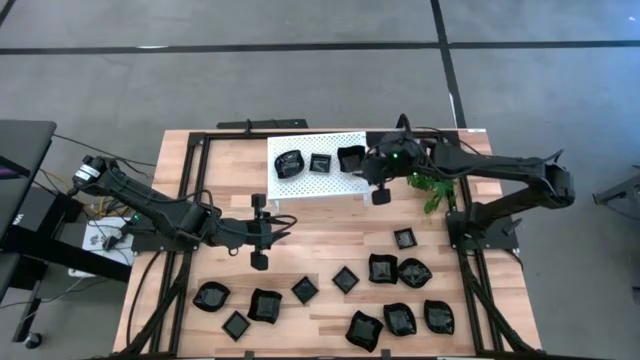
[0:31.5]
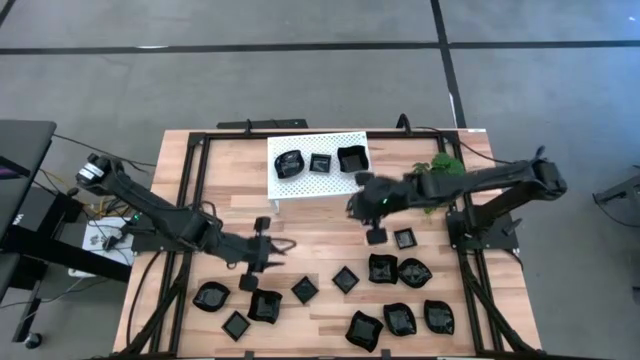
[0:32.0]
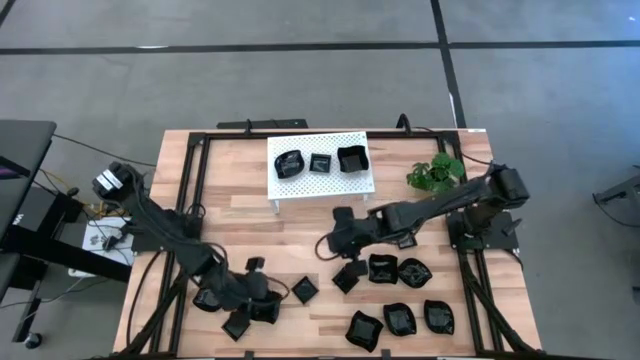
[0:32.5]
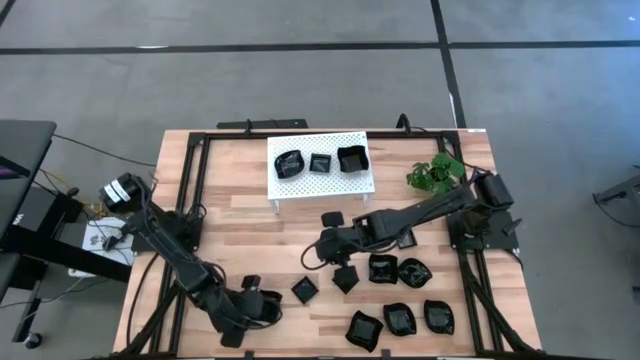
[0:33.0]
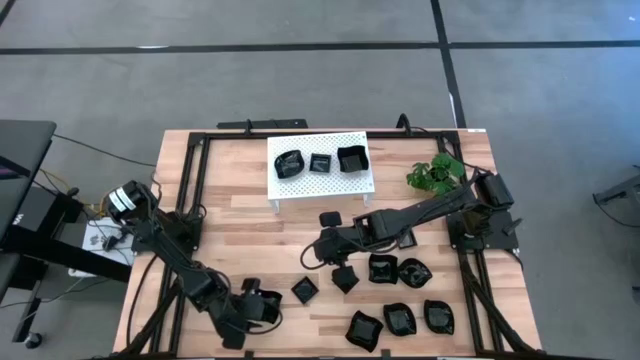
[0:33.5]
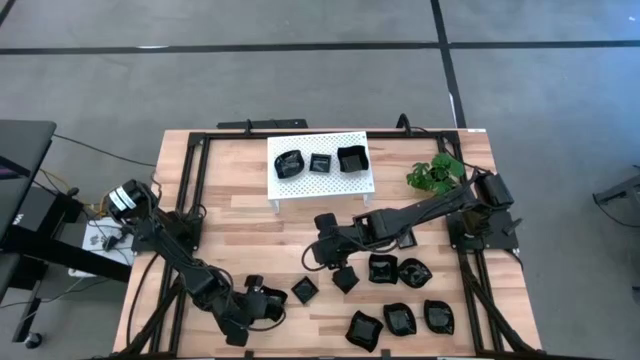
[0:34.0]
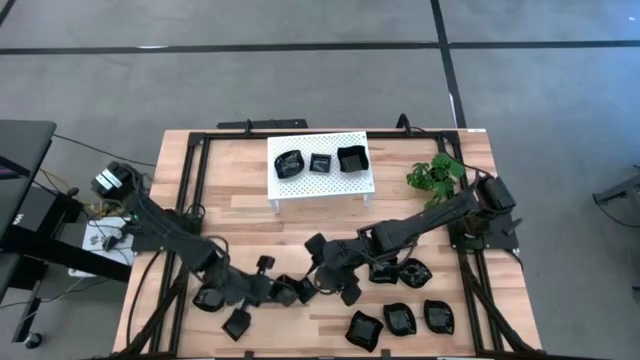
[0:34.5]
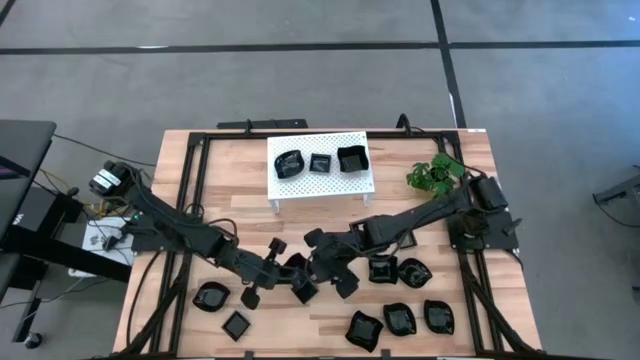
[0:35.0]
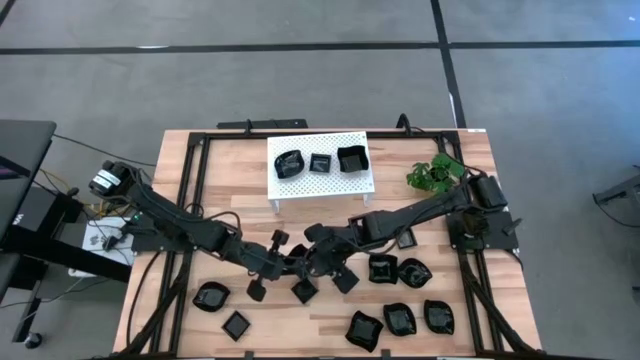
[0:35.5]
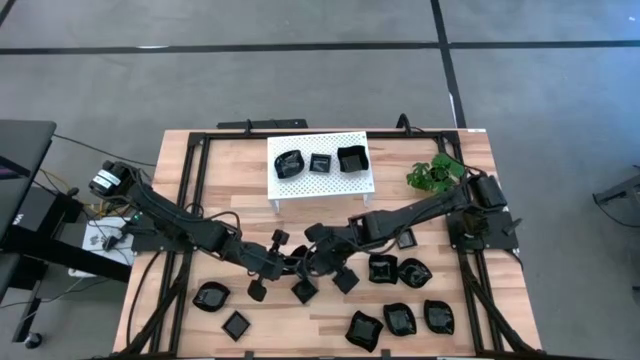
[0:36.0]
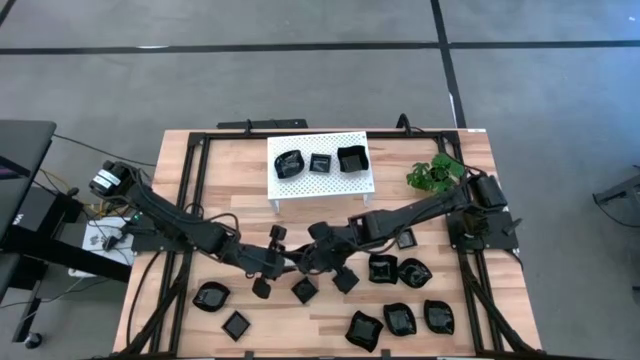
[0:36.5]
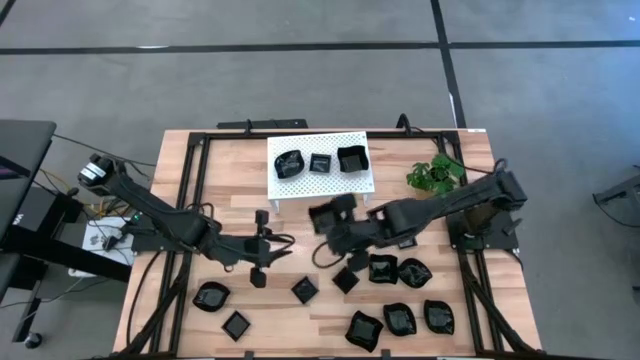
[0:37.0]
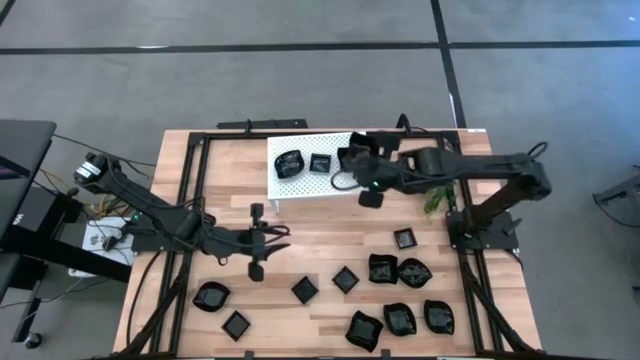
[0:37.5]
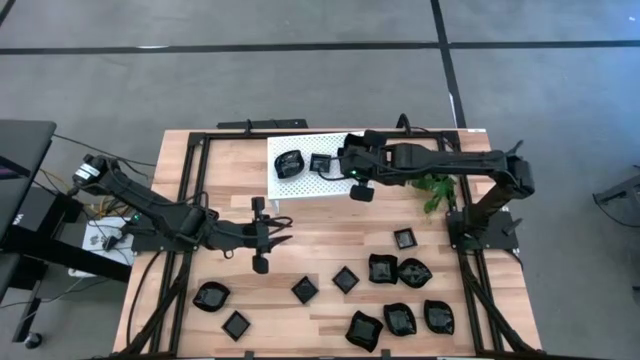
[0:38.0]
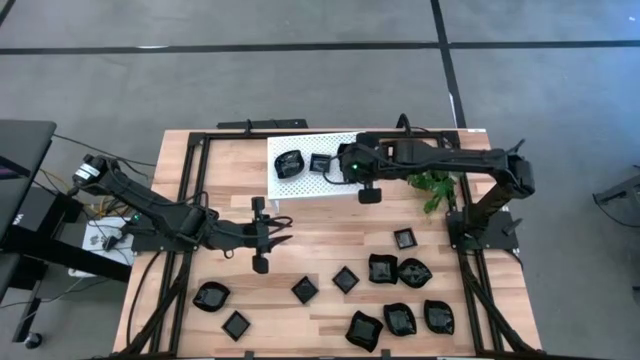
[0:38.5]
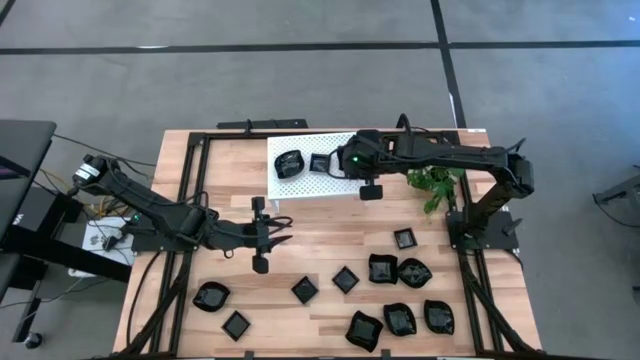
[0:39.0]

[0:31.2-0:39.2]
Task: Pick & Place Mini shaped plates
Stack the distorted square plate on top of the distorted square plate on the shelf

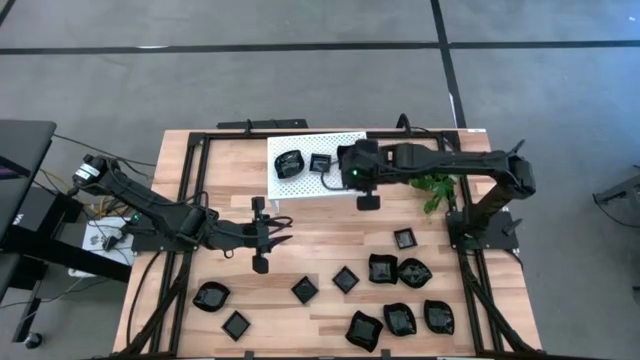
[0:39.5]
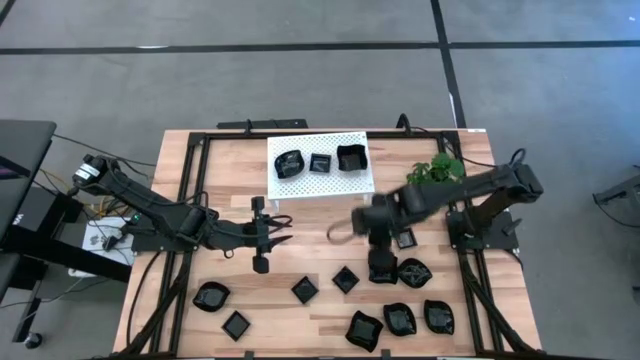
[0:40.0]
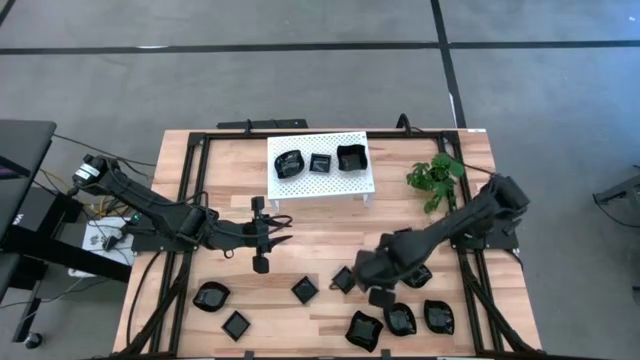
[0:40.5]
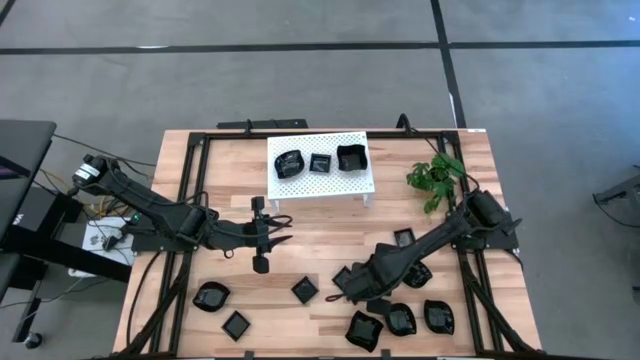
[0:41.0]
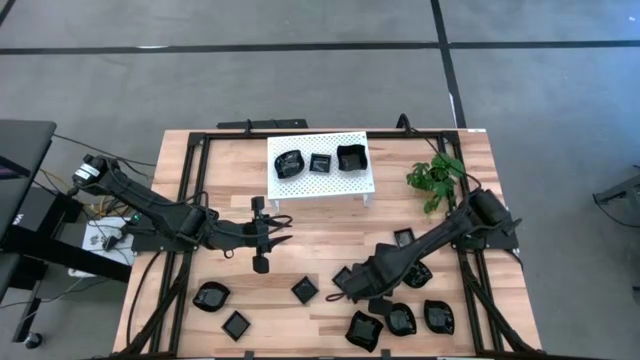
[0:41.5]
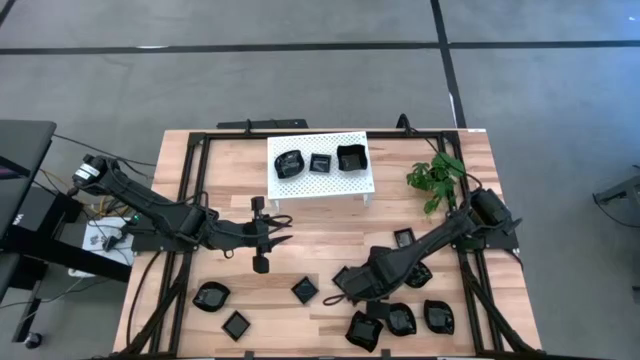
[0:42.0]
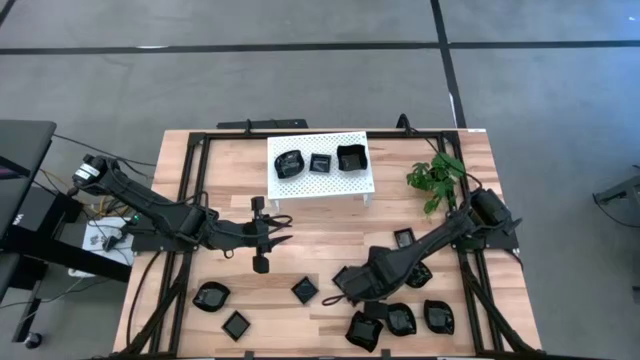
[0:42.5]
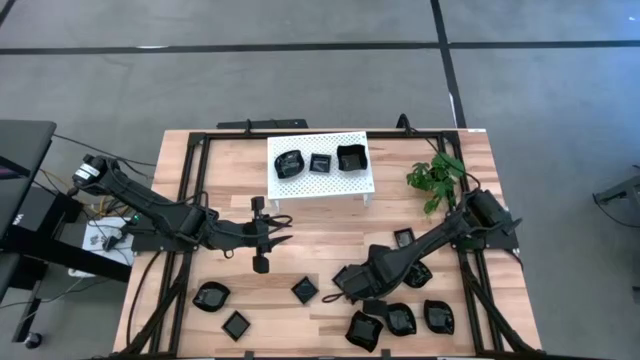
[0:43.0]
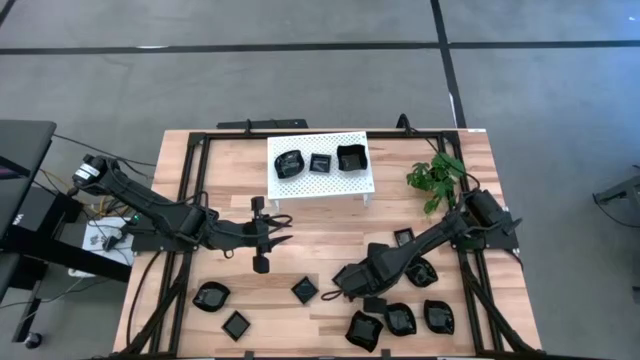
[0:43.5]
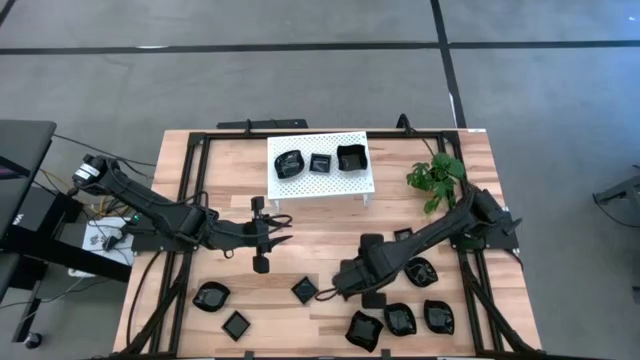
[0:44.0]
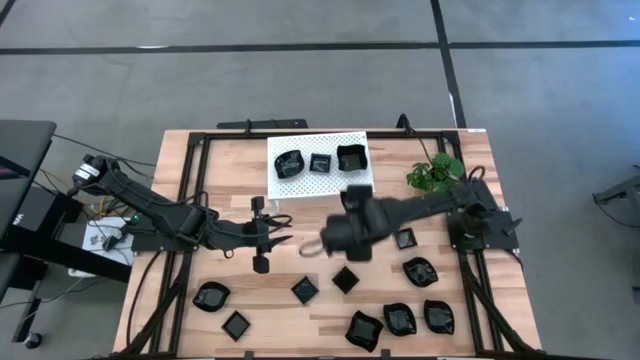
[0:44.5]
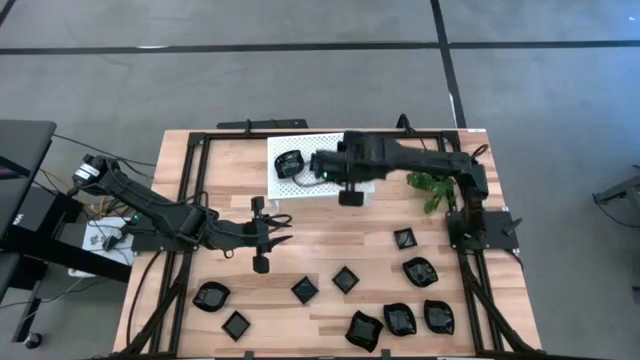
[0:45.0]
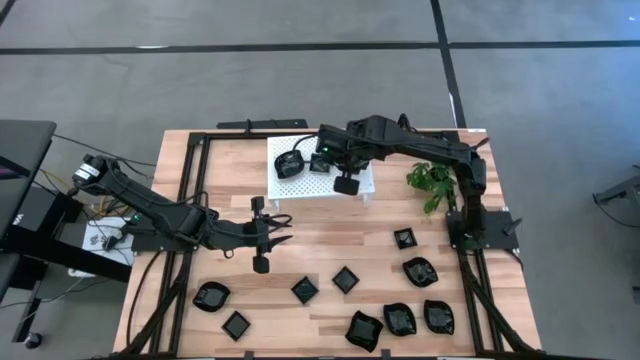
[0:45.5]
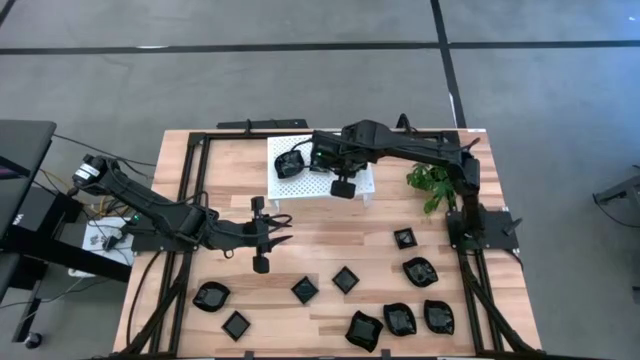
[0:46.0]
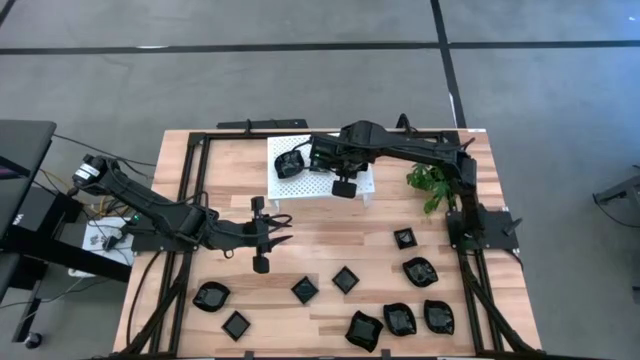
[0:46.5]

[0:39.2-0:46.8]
Stack the distorted square plate on top of the distorted square plate on the shelf

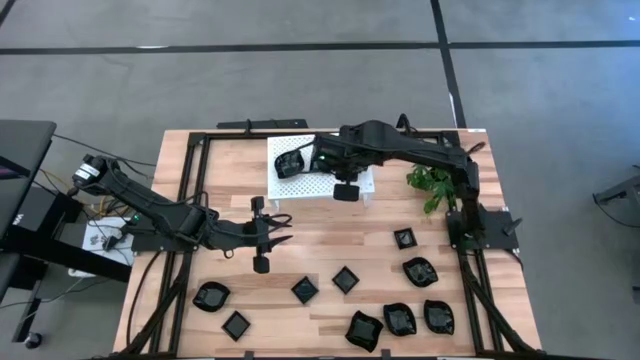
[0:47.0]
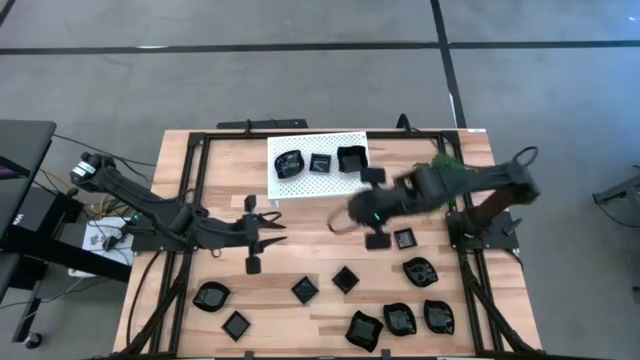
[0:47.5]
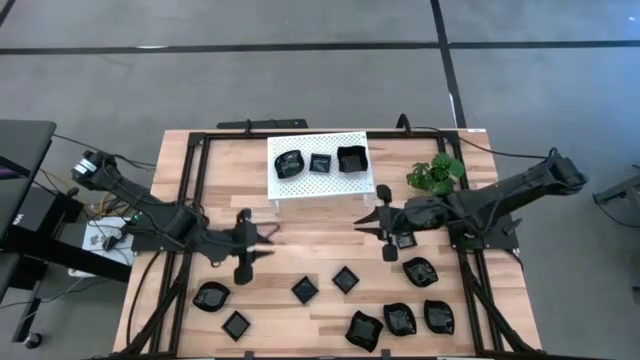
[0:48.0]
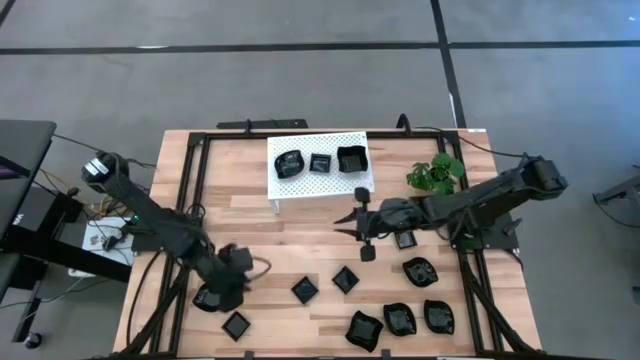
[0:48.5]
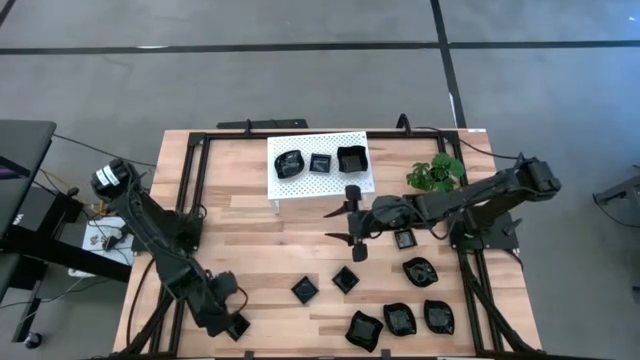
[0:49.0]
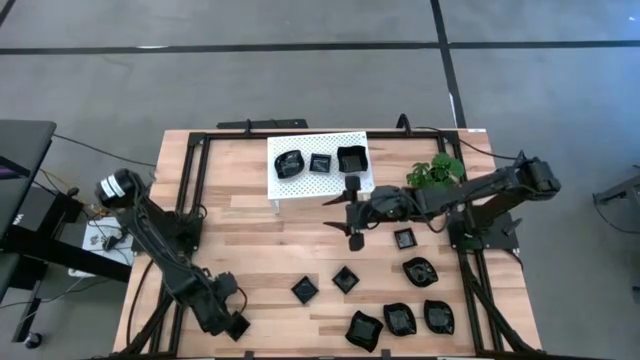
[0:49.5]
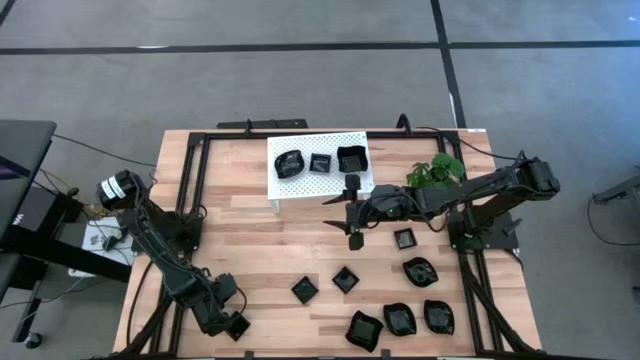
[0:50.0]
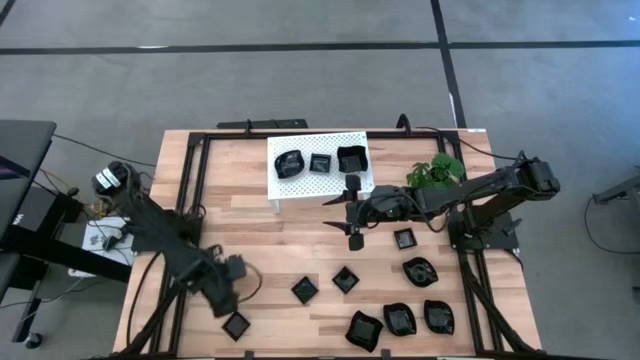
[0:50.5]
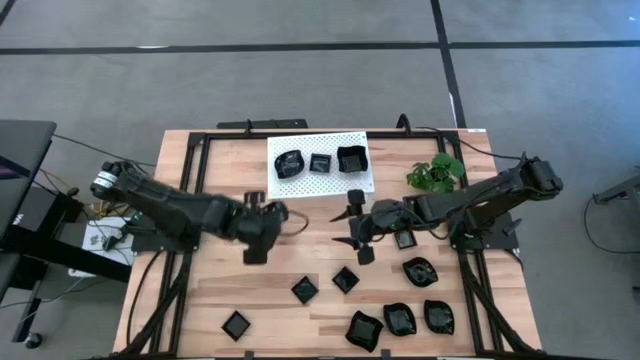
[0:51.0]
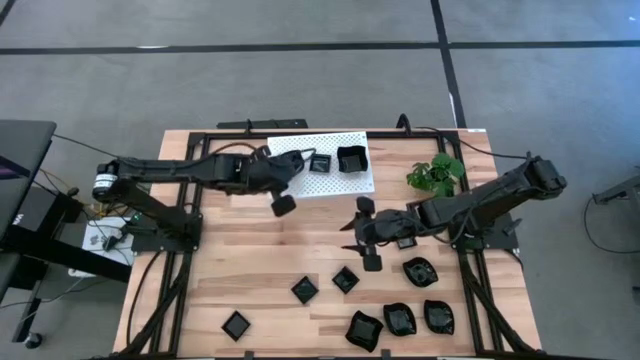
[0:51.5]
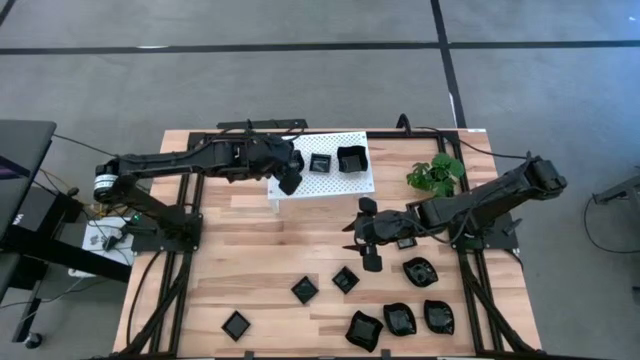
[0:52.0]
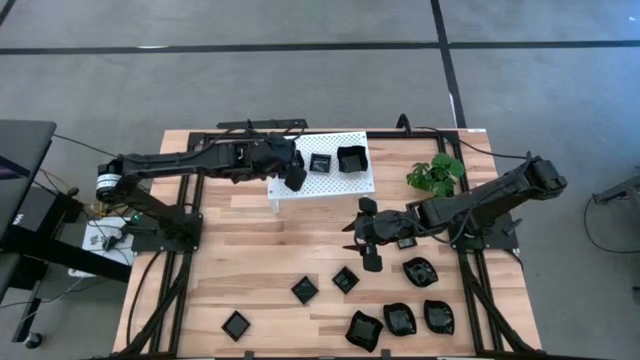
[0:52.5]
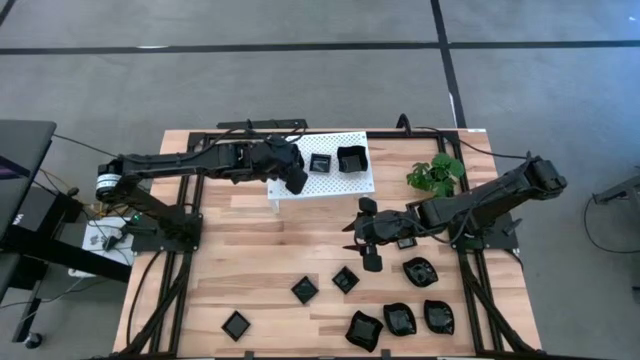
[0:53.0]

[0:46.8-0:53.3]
Stack the leaf-shaped plate on top of the leaf-shaped plate on the shelf
